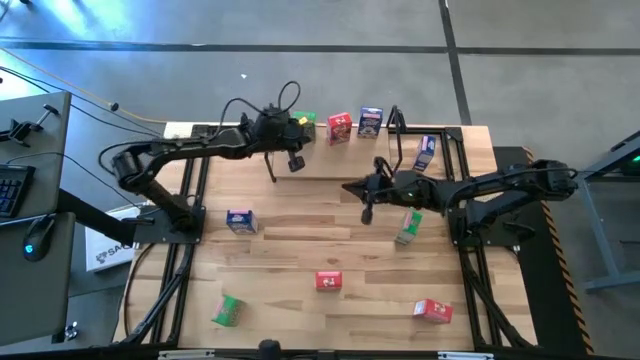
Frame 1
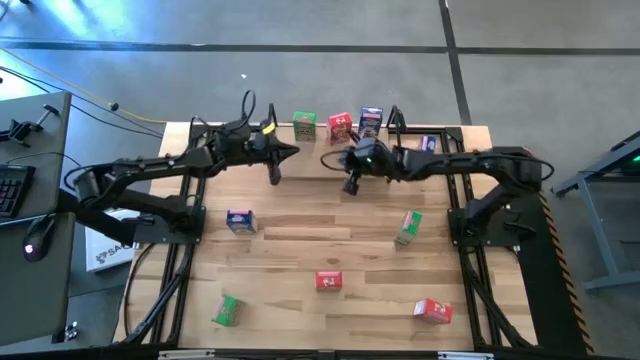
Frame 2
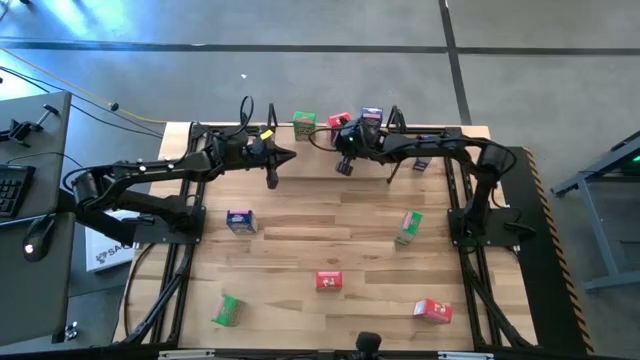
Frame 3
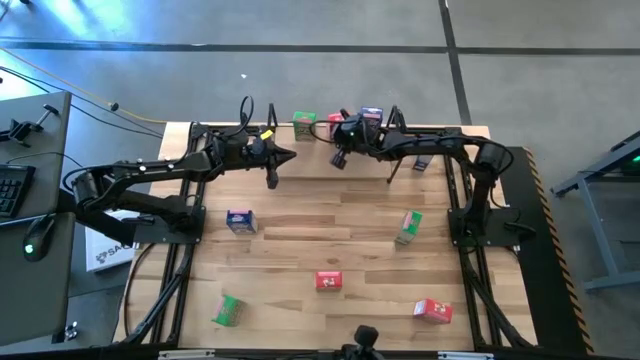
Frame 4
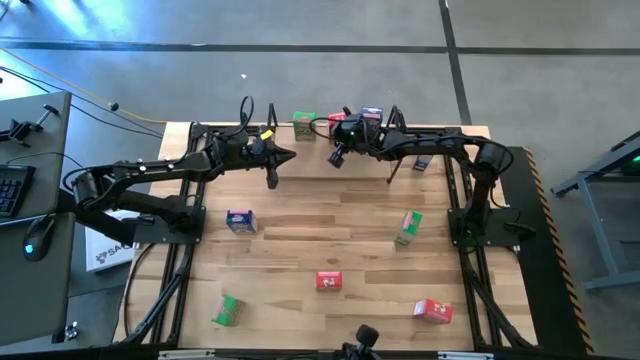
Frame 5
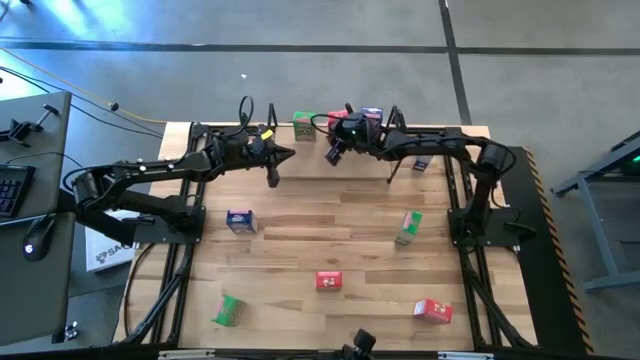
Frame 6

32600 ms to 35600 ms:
Task: Stack cereal on shelf
Adjust the red cereal box on the shelf

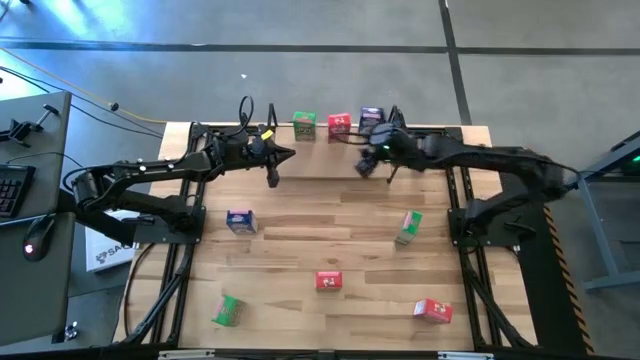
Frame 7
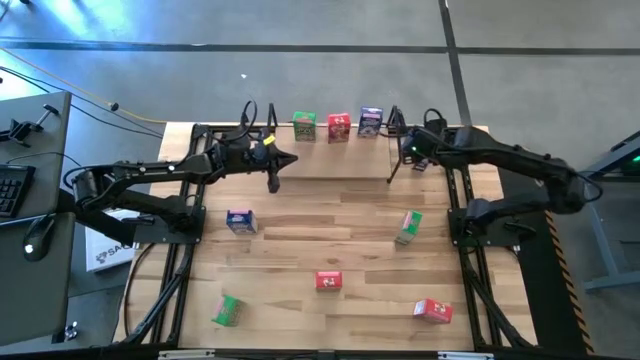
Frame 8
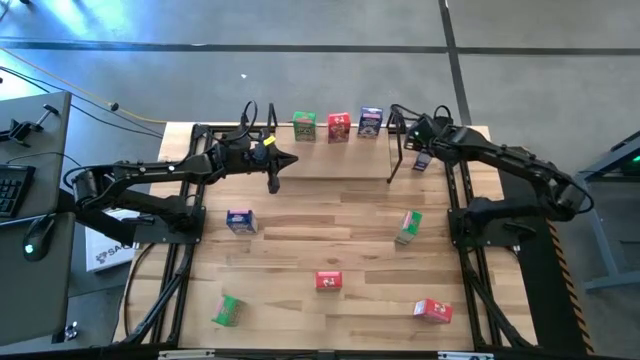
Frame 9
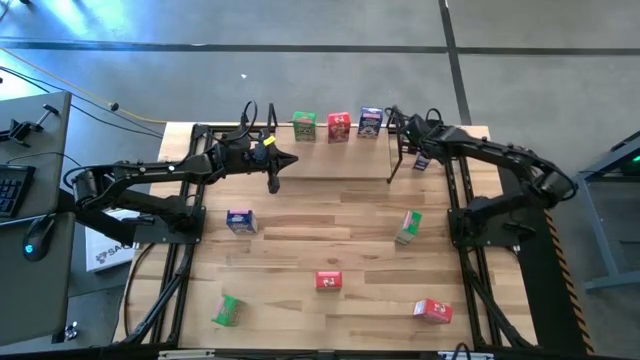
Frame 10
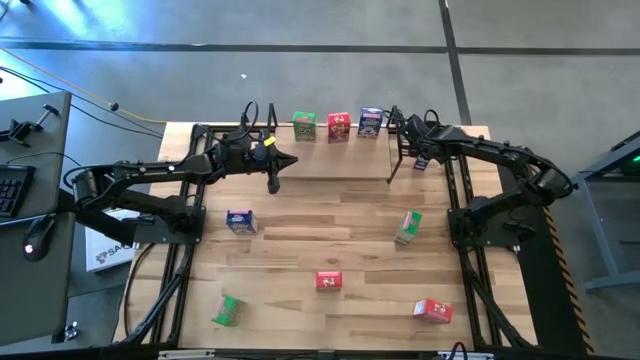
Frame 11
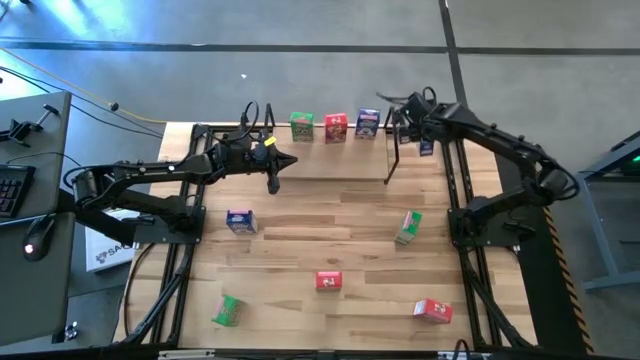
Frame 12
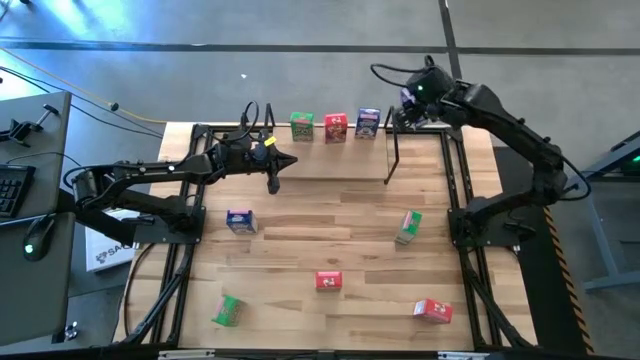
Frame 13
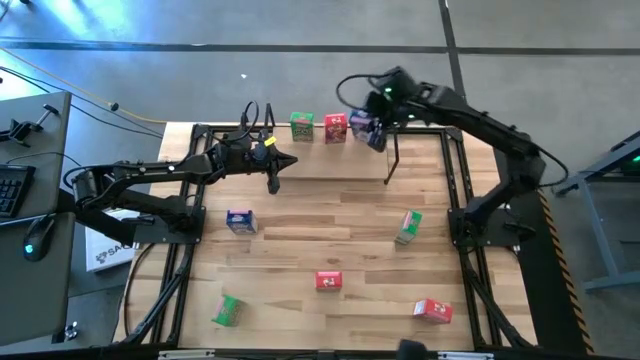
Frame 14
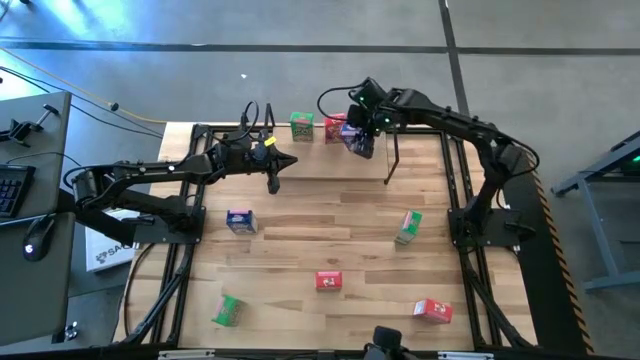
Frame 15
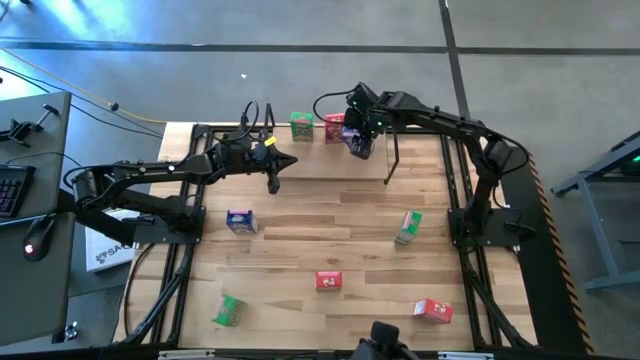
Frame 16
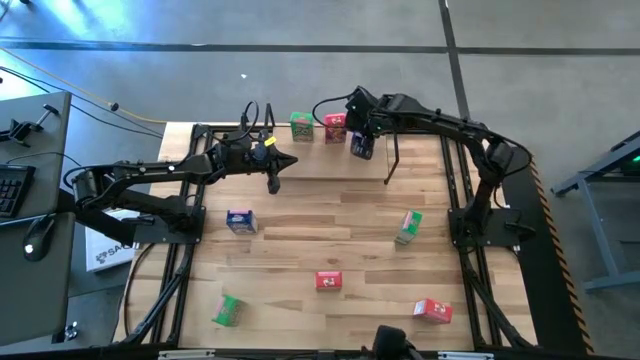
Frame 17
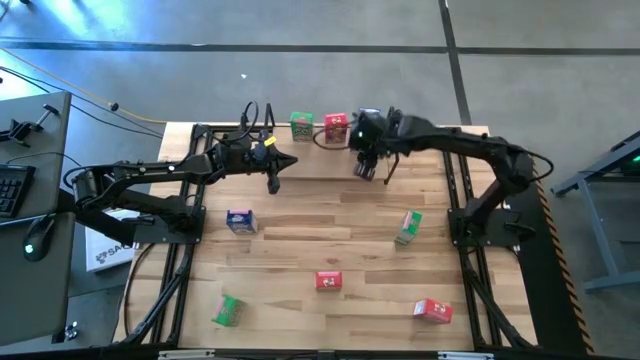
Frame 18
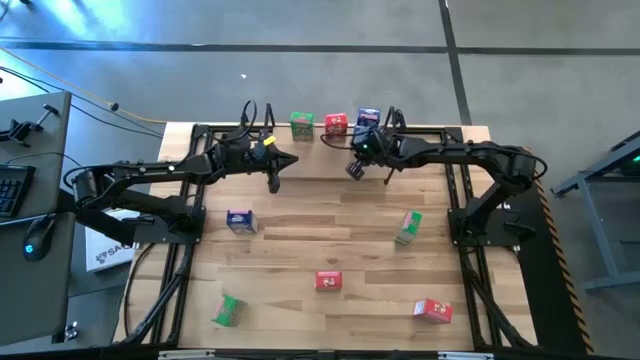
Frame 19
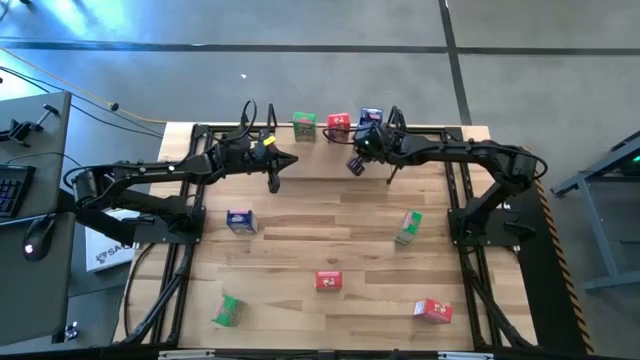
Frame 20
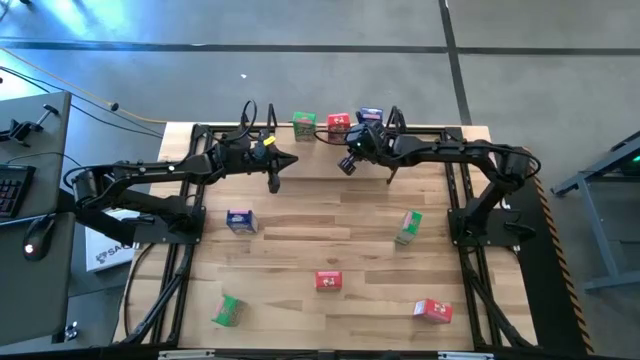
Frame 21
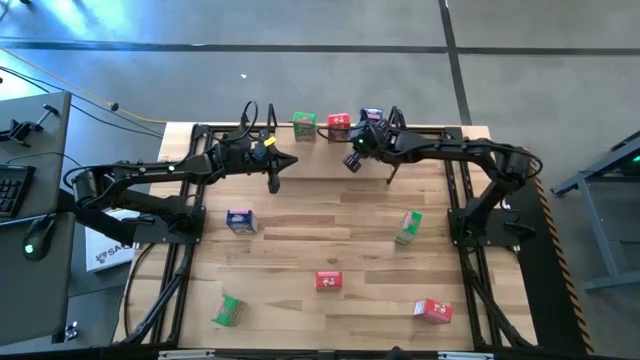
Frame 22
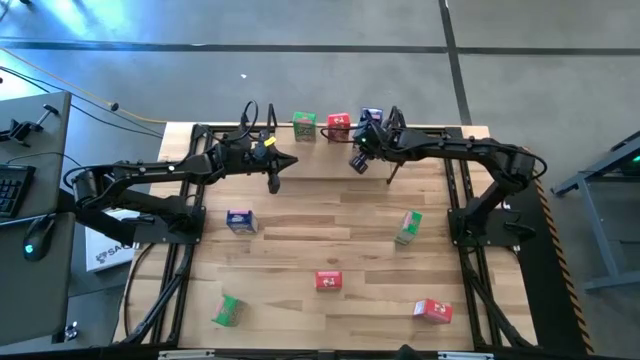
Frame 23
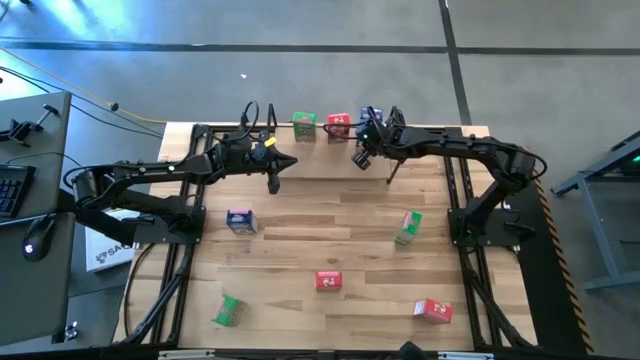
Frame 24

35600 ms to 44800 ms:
Put the top blue cereal box on the shelf aligned with the other blue cereal box

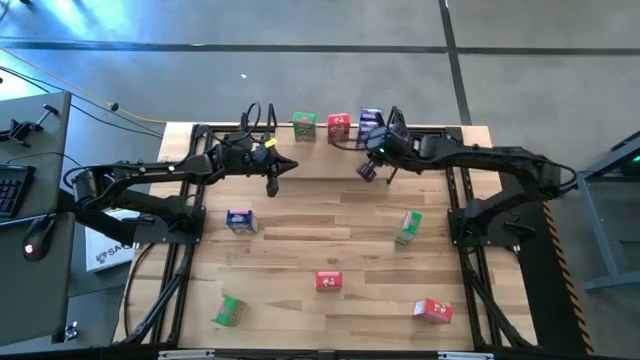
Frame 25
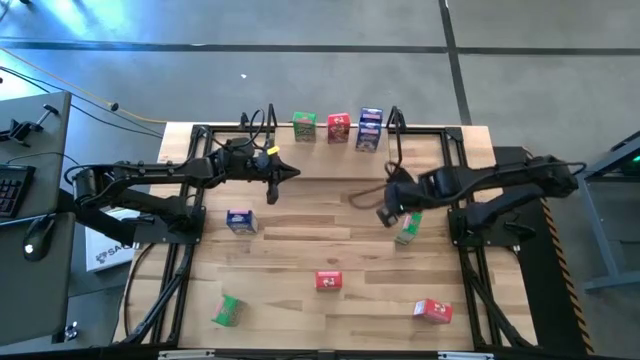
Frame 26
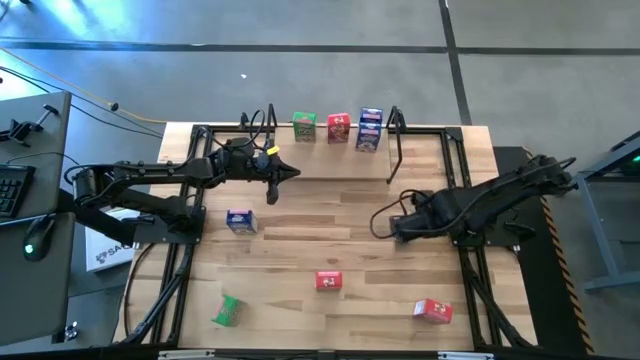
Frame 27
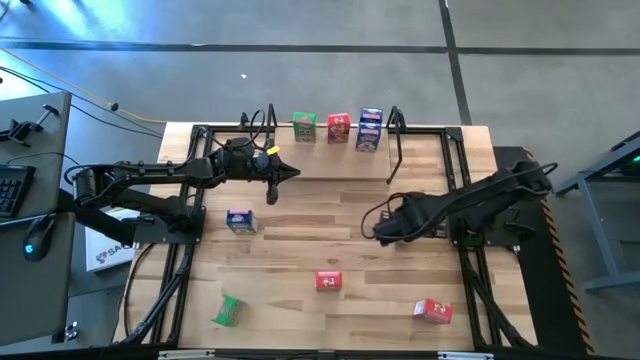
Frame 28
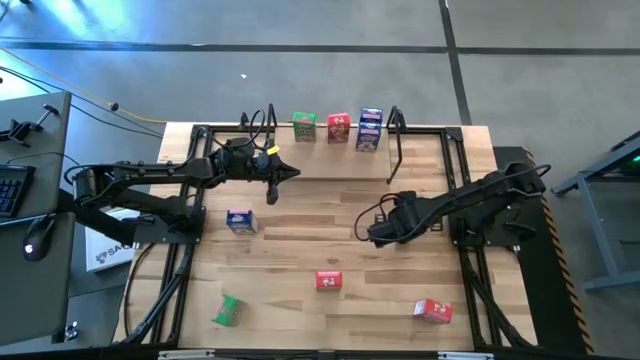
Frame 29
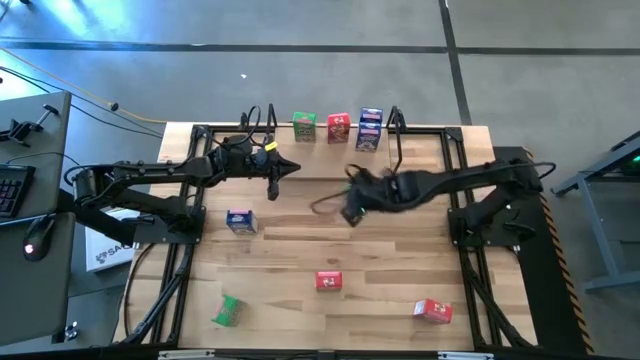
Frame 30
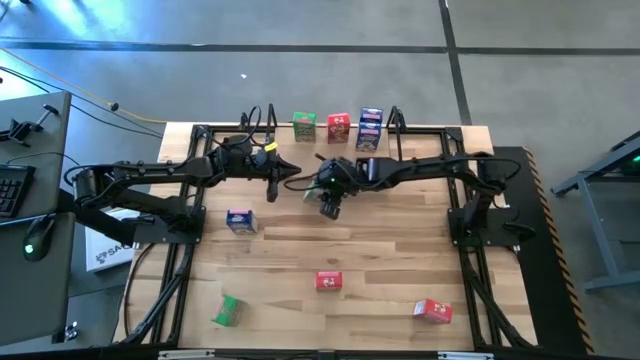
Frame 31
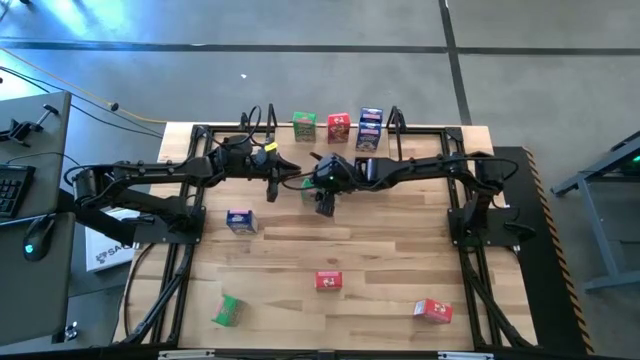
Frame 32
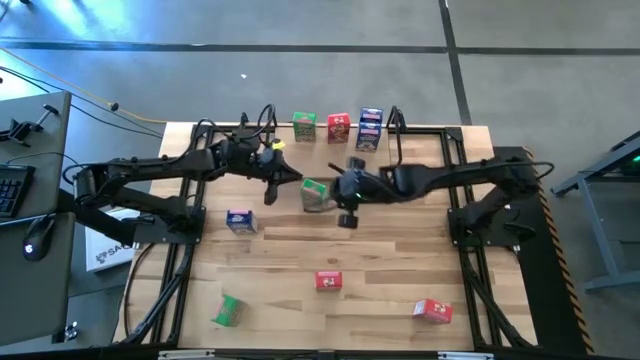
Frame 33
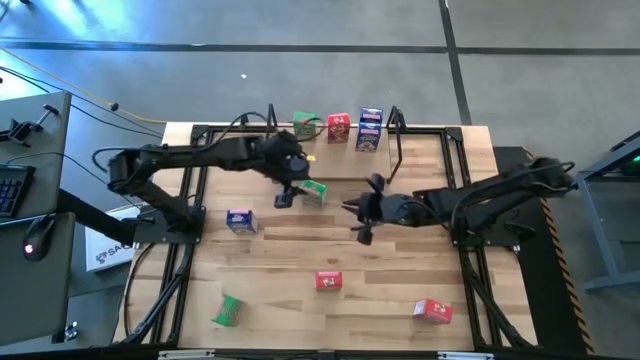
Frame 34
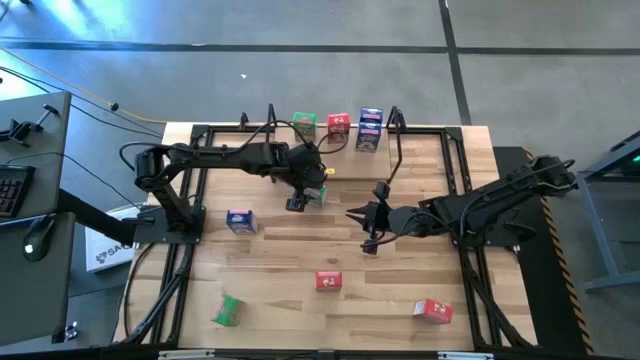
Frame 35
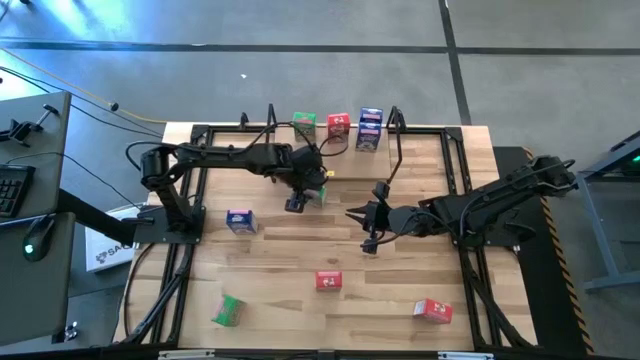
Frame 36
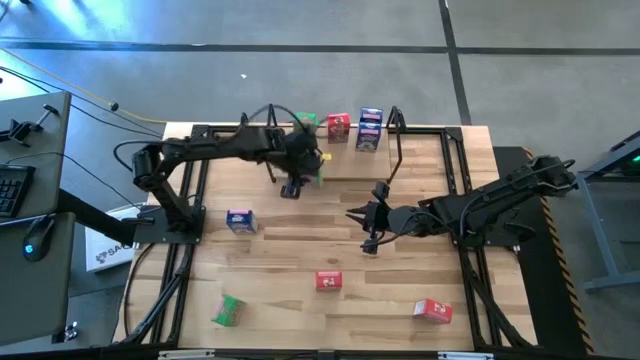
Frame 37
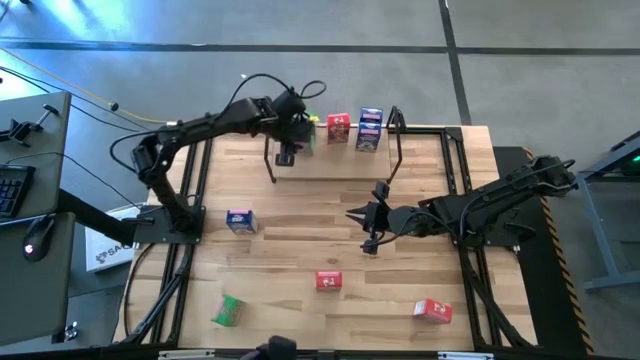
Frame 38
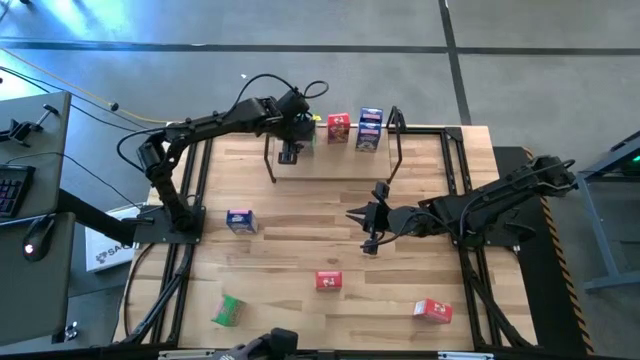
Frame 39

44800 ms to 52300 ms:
Put the top green cereal box on the shelf aligned with the other green cereal box

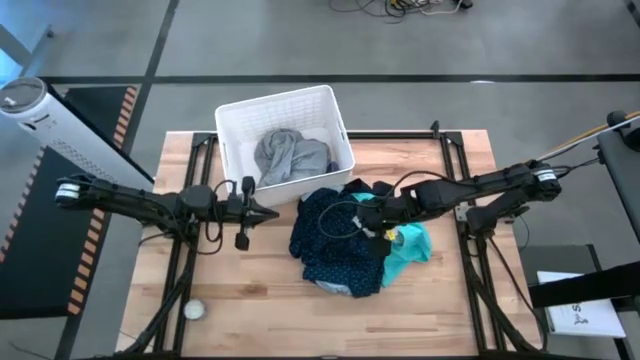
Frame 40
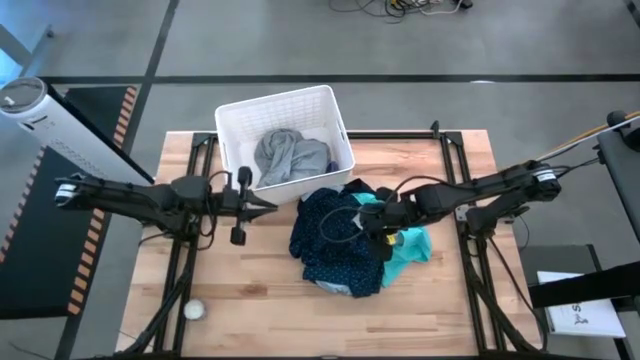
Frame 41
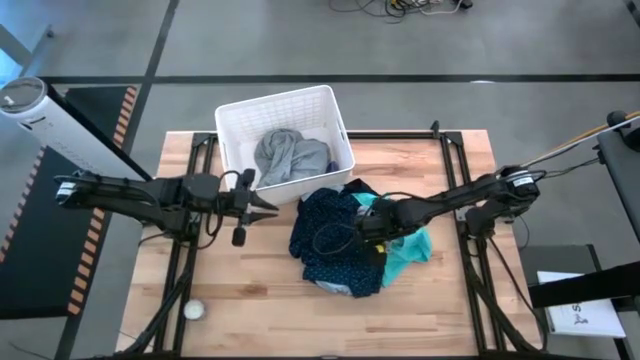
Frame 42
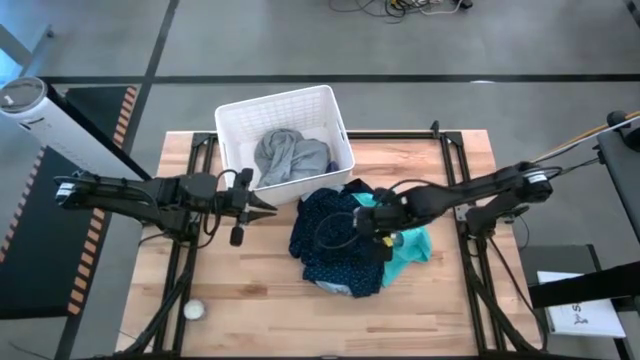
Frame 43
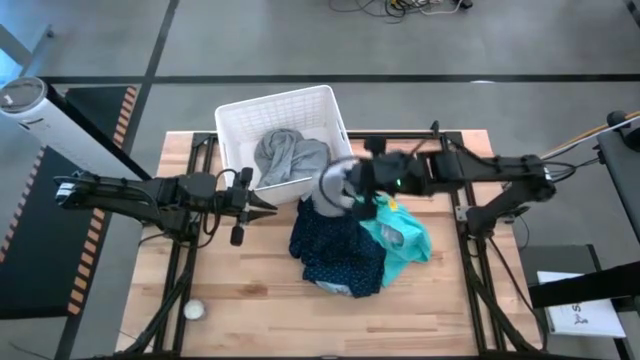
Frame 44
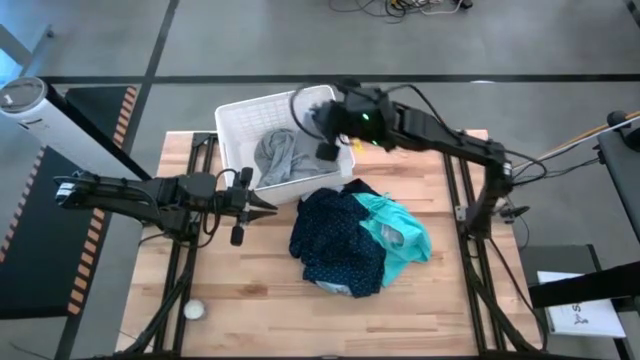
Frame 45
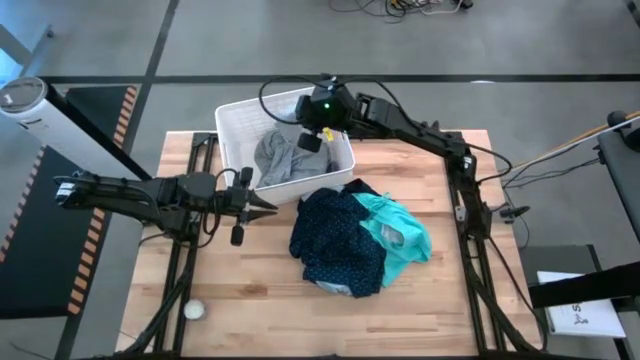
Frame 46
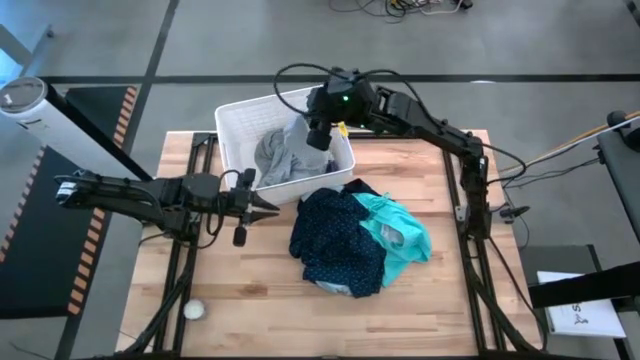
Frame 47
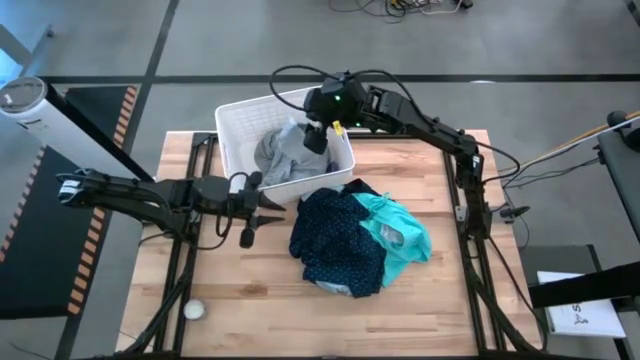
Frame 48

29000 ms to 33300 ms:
Task: Sort clothes
Put the gray sock into the white laundry bin
